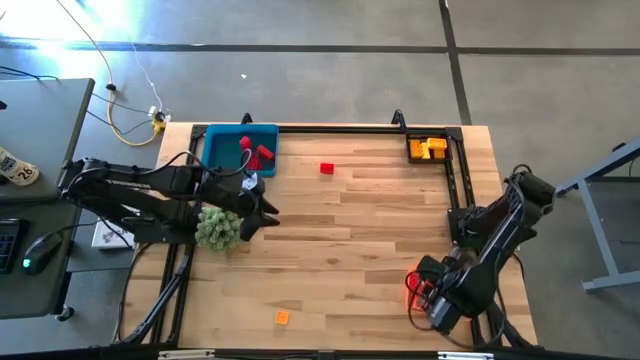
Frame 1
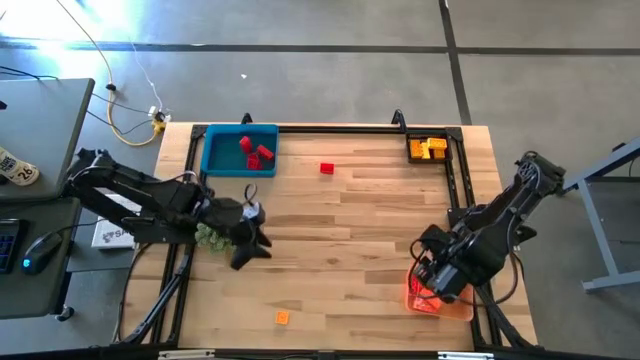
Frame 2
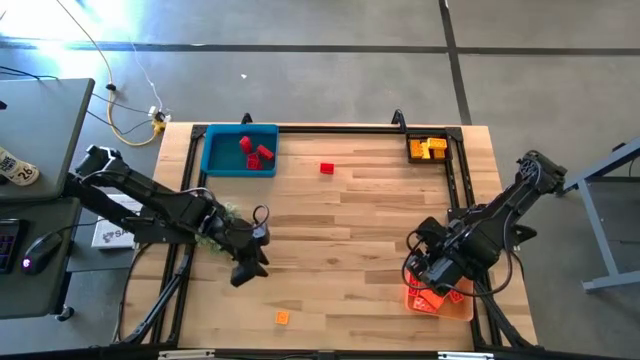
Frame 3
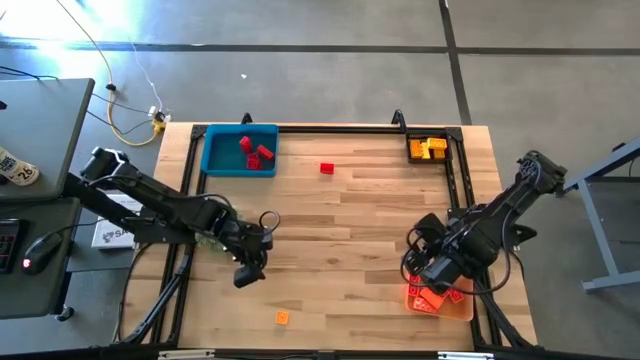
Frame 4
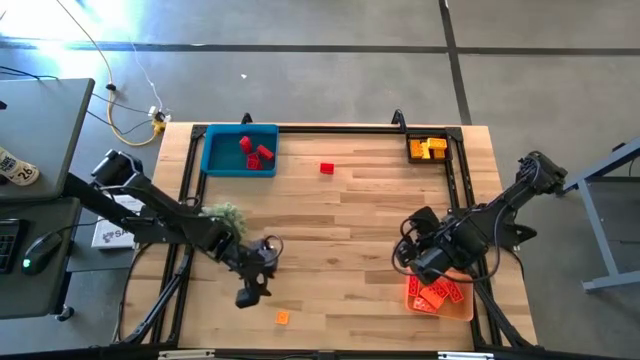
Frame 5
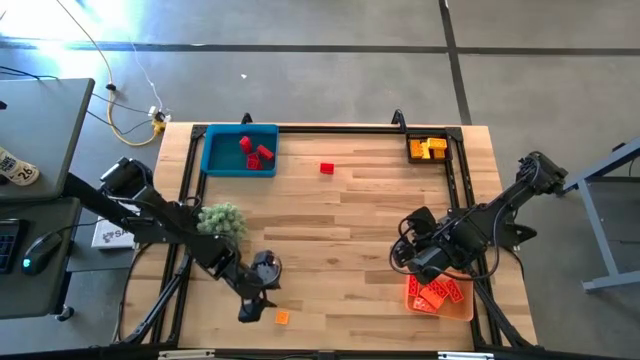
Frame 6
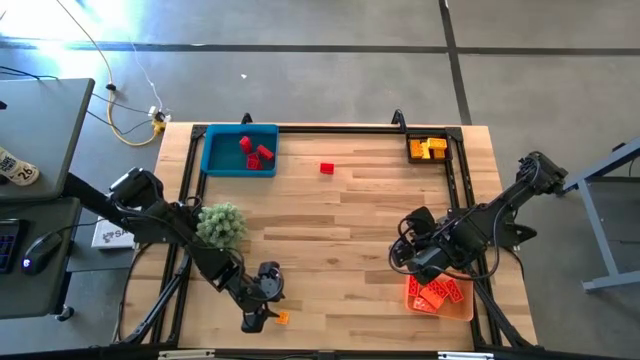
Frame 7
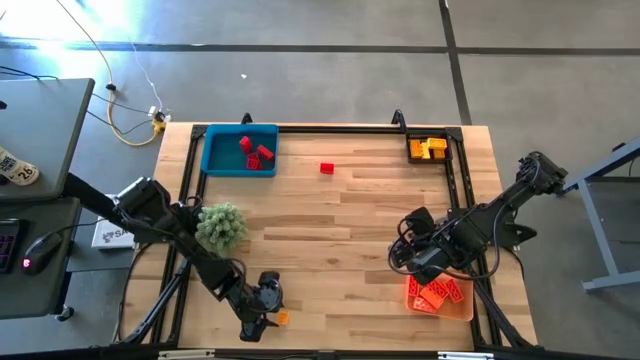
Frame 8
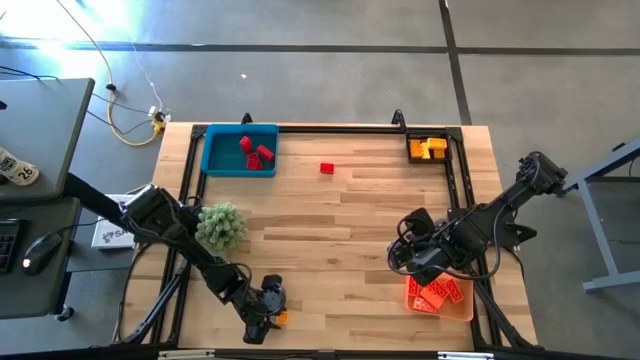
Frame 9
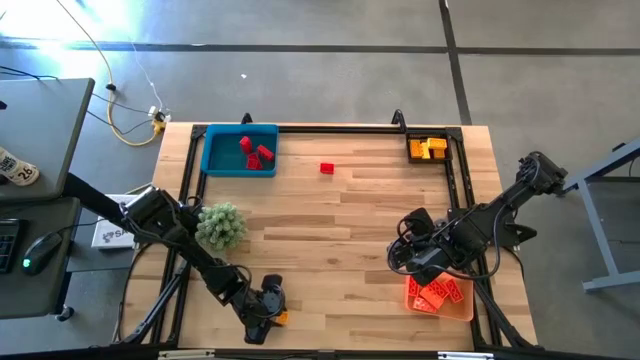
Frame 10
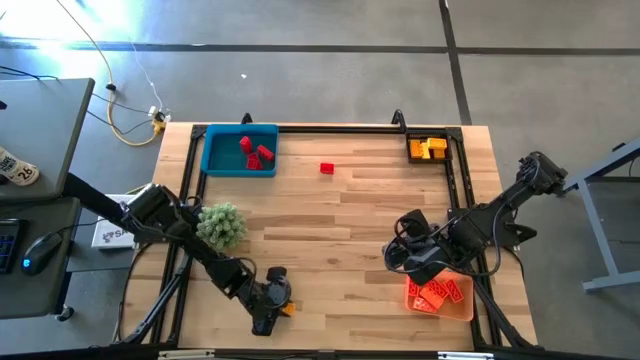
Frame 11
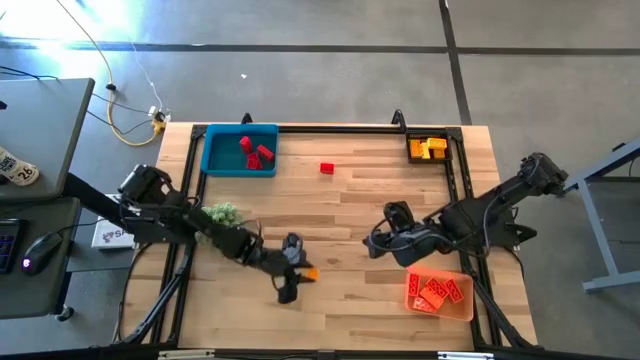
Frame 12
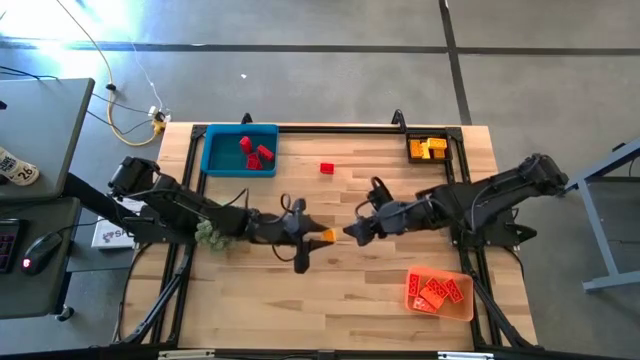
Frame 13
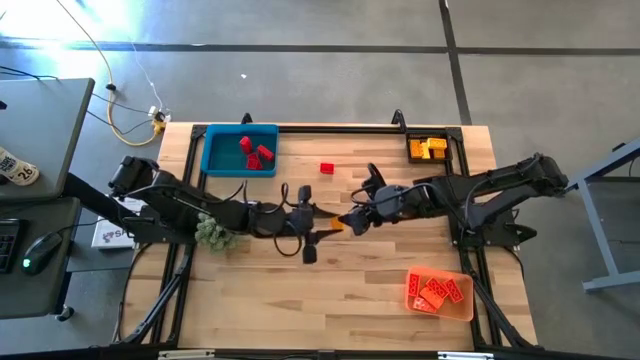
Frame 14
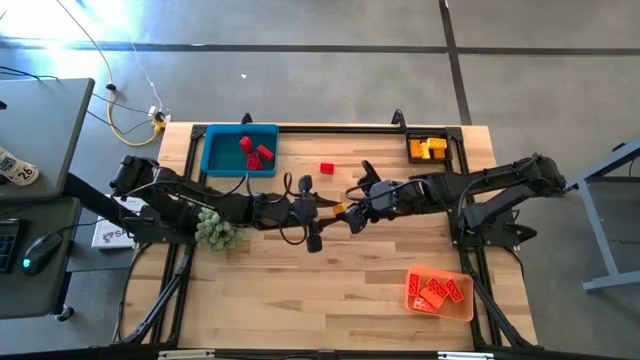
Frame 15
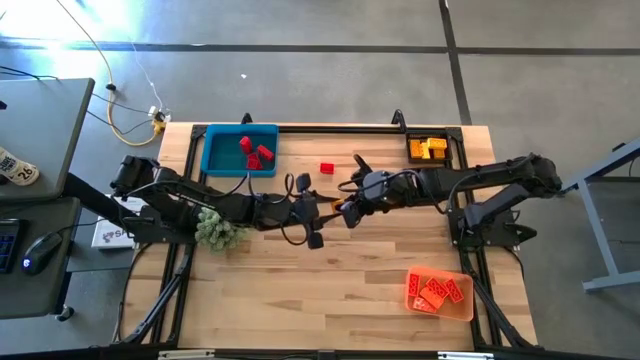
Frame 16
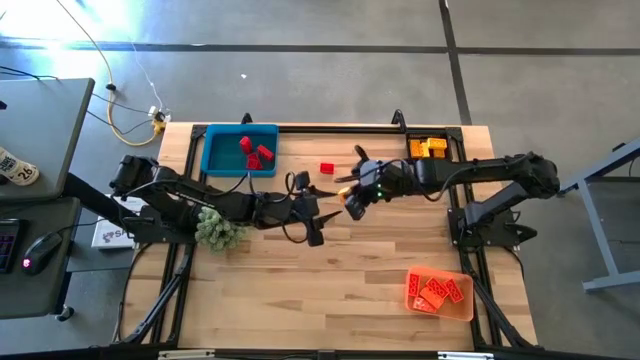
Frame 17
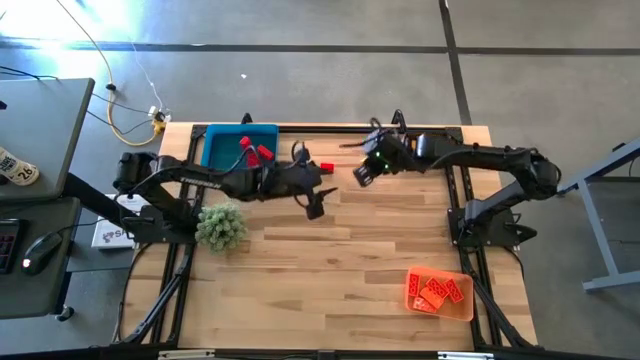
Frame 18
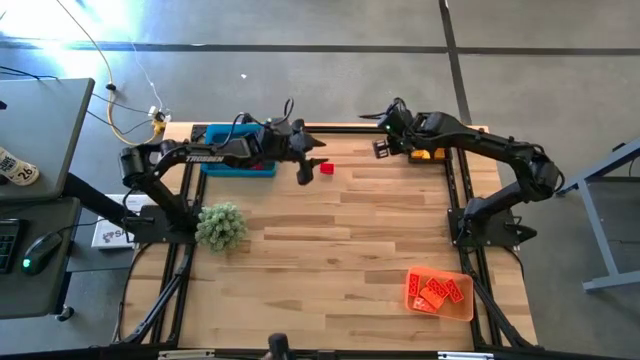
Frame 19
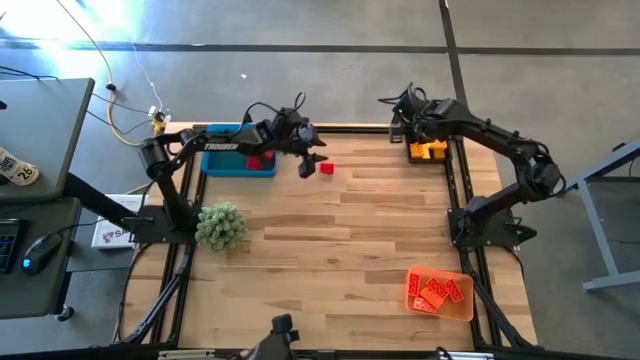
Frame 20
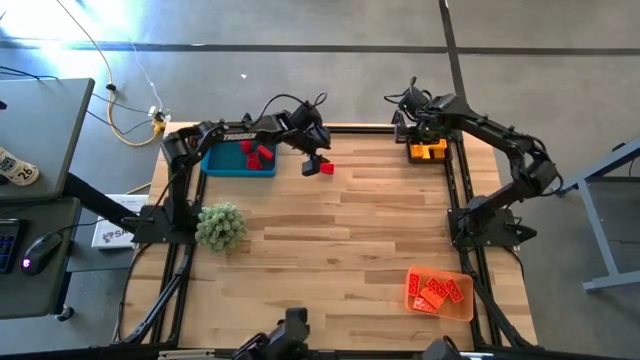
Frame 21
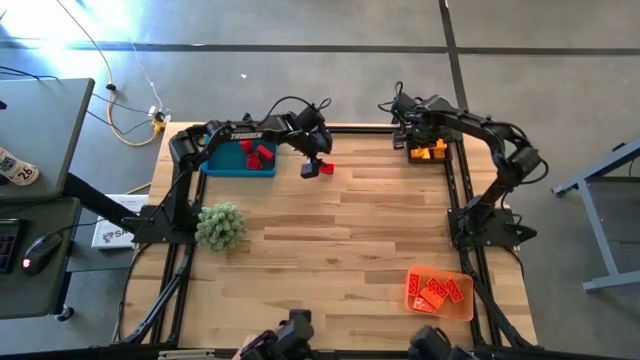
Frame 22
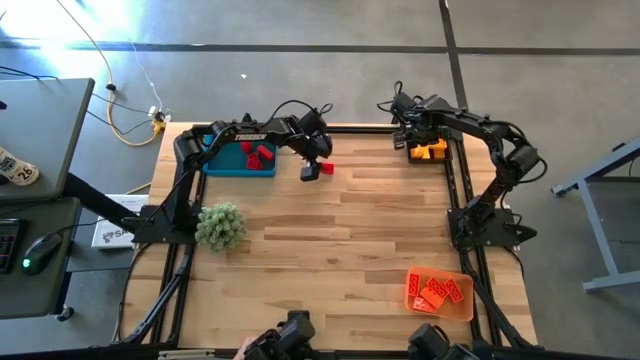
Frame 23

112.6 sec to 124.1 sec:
Task: Sort & place blocks by color
Put the yellow game piece into the black bin

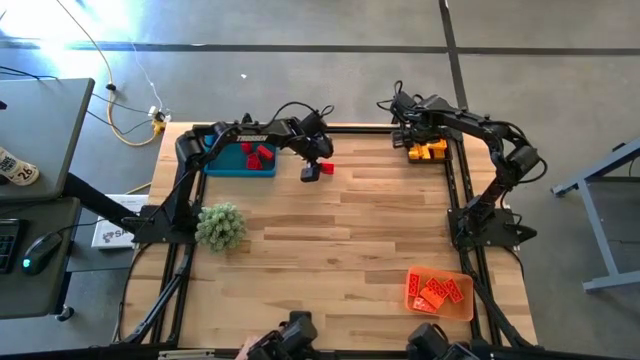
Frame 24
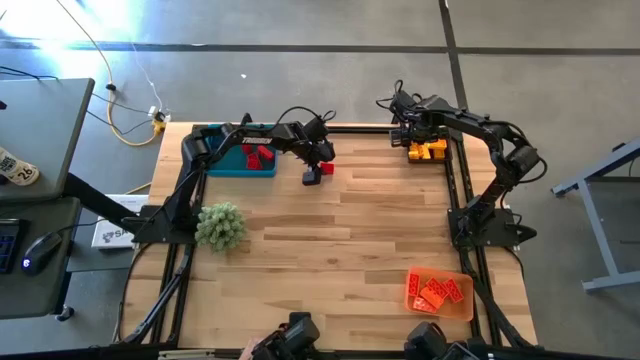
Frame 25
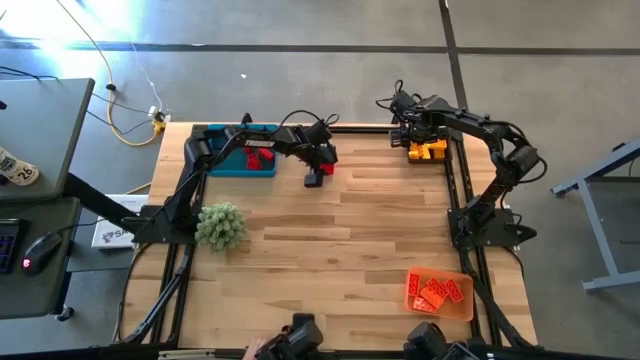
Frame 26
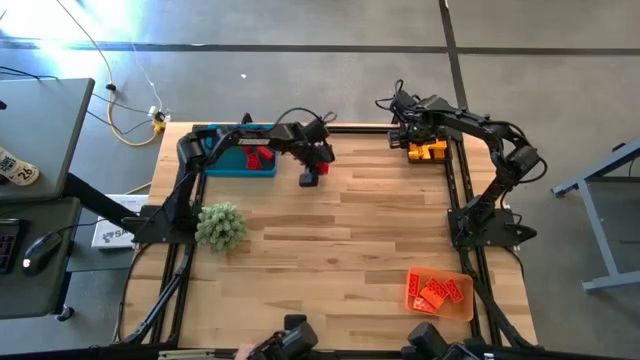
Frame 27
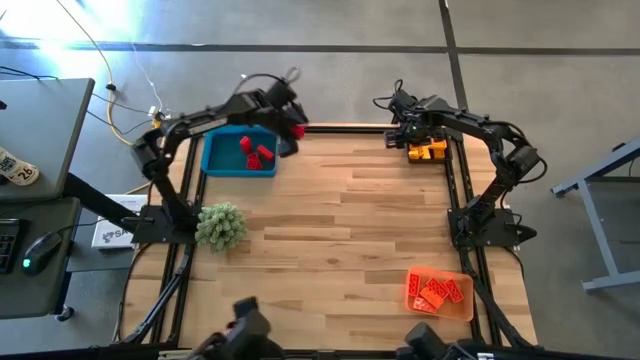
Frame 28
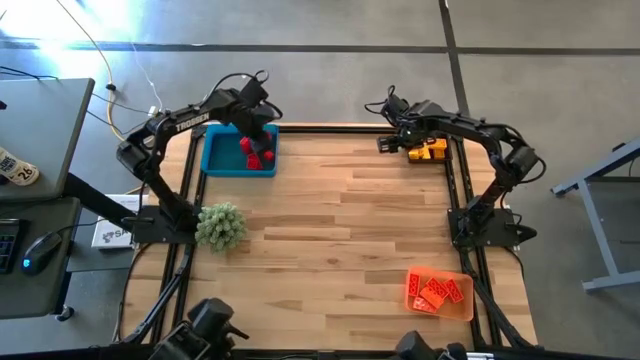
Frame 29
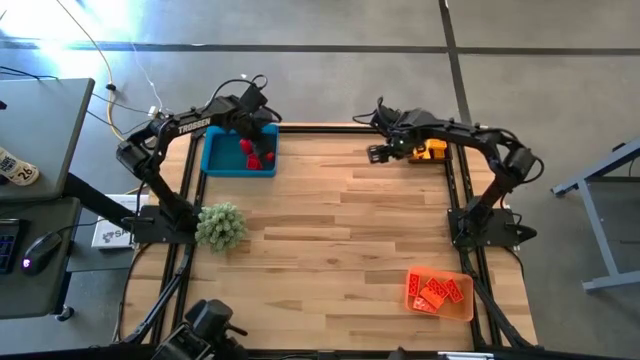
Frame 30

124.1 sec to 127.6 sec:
Put the red game piece into the blue bin

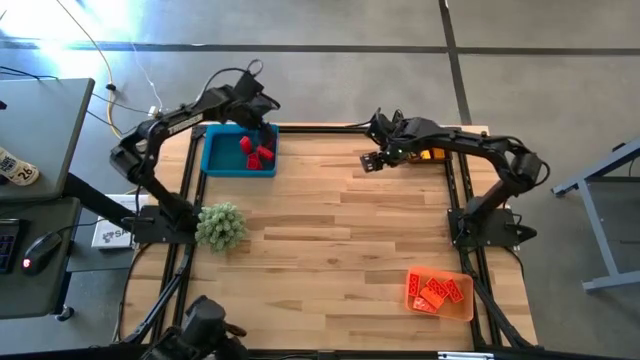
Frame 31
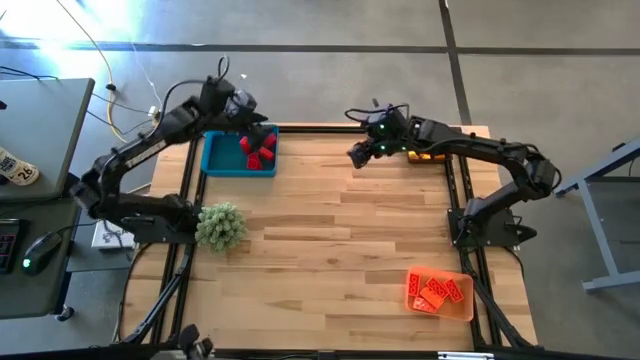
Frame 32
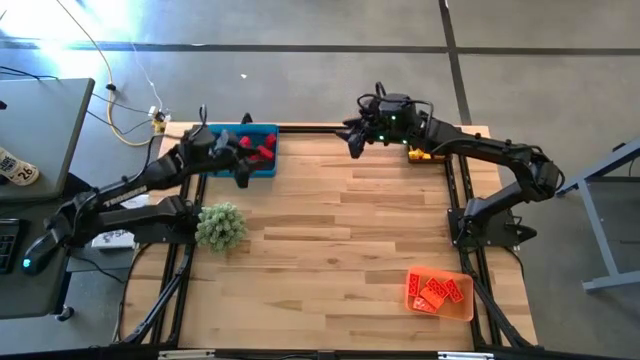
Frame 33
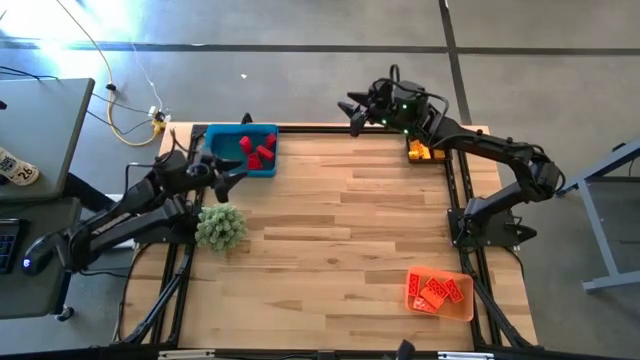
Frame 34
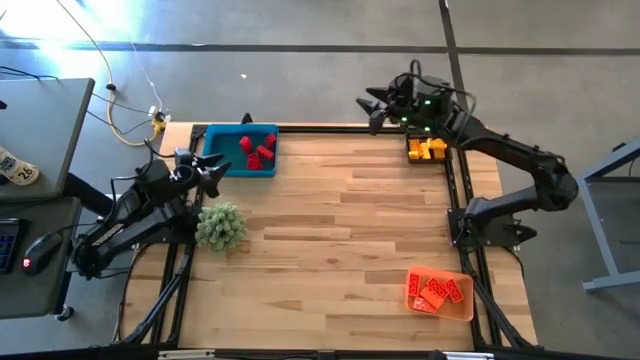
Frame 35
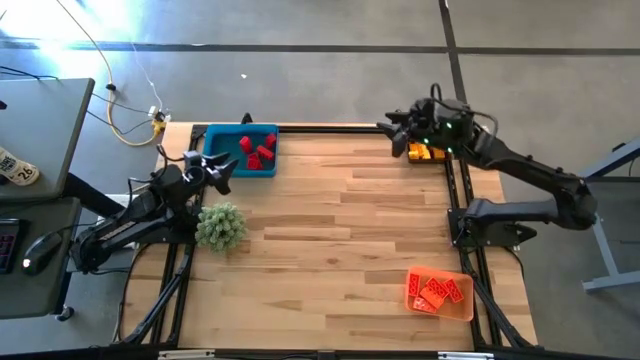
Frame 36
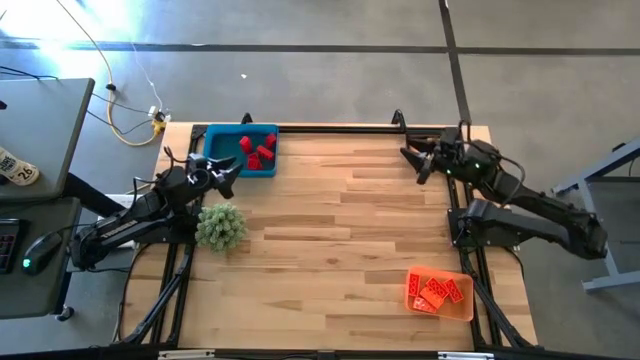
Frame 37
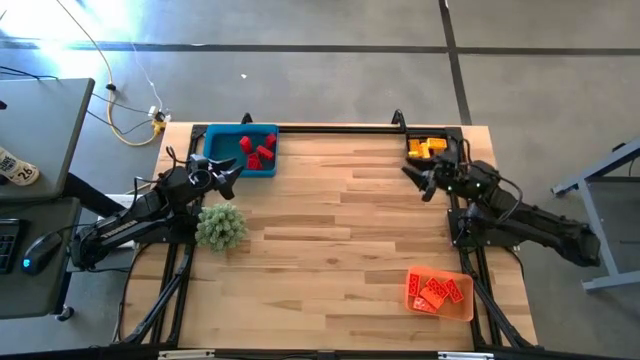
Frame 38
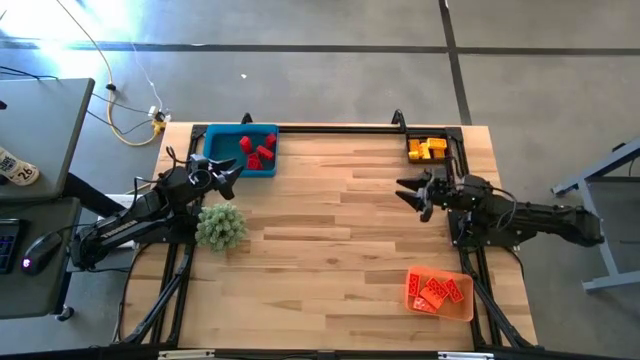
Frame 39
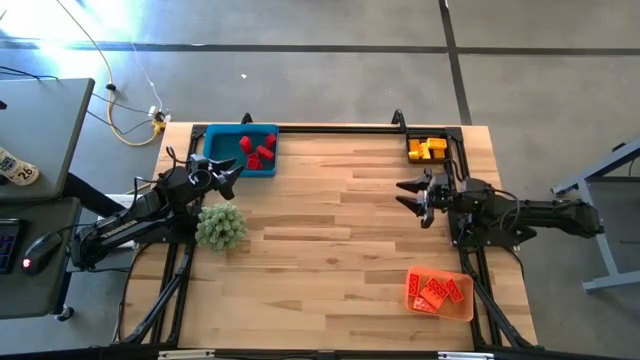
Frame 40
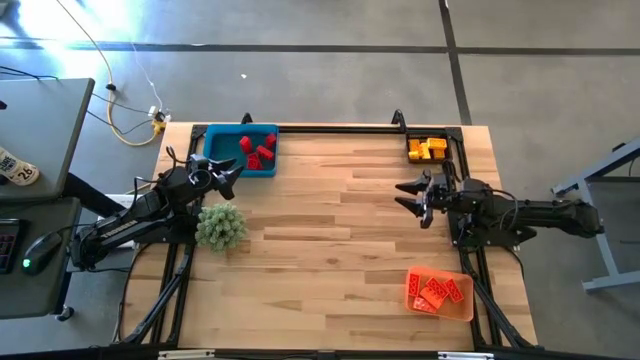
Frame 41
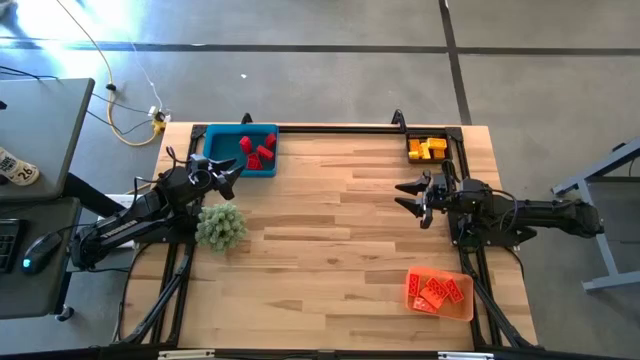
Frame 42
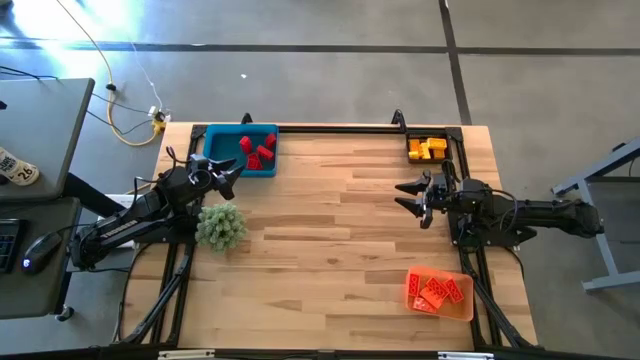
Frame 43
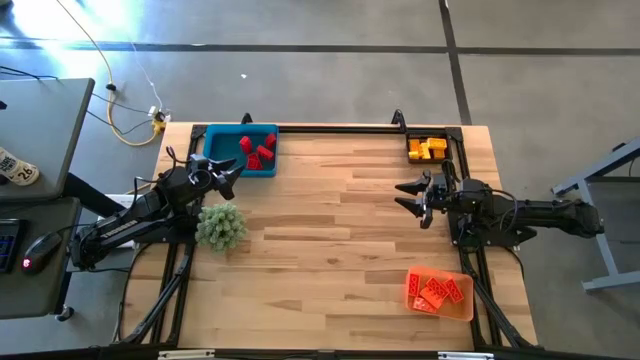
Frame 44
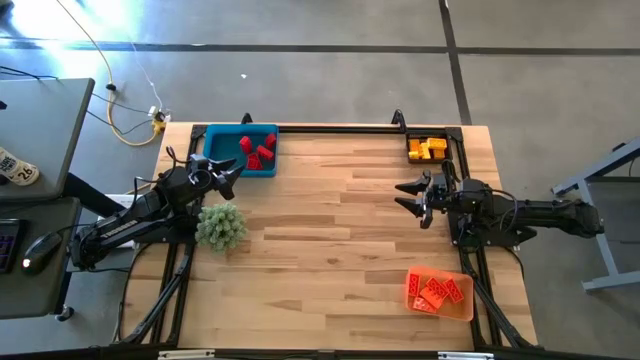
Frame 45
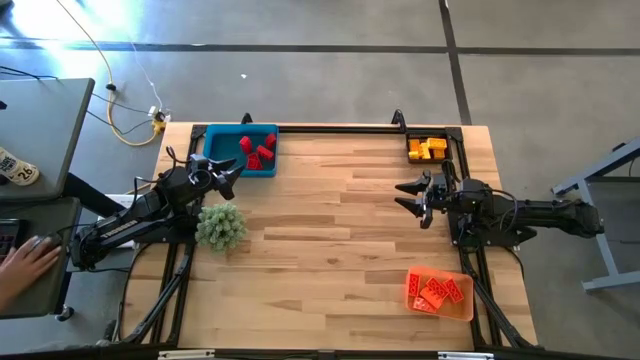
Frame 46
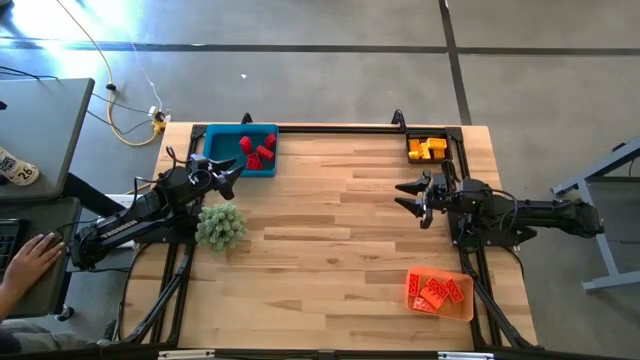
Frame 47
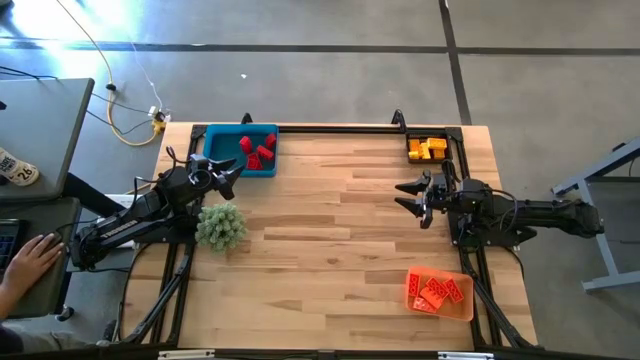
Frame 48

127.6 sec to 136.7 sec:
Return to Home Position
